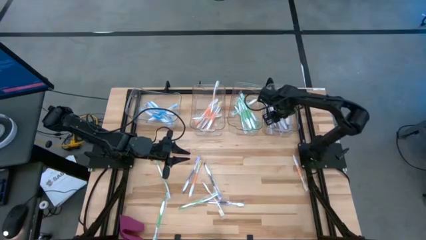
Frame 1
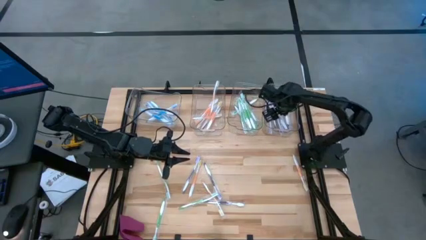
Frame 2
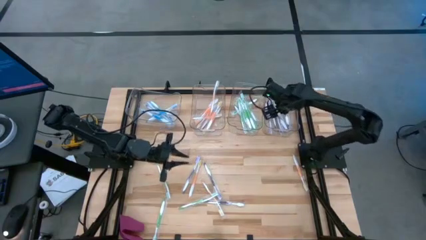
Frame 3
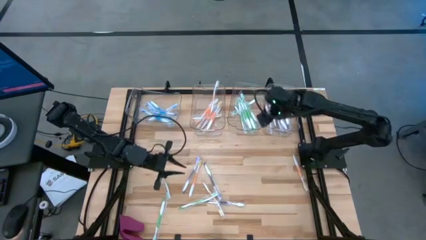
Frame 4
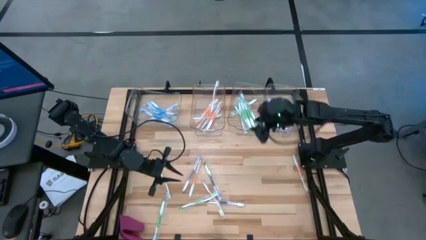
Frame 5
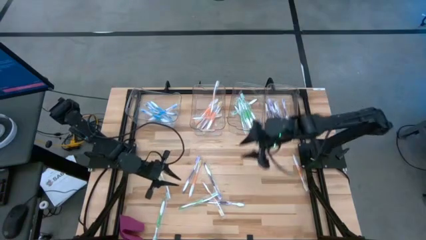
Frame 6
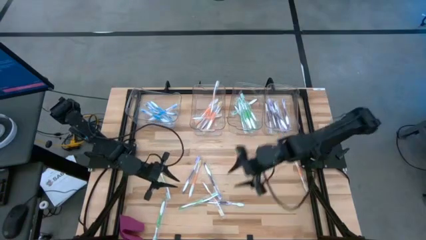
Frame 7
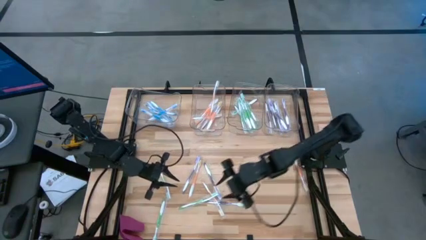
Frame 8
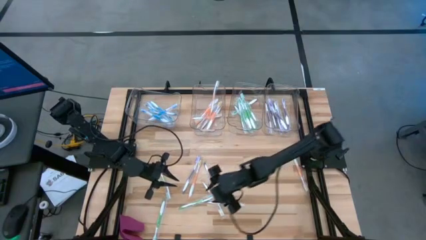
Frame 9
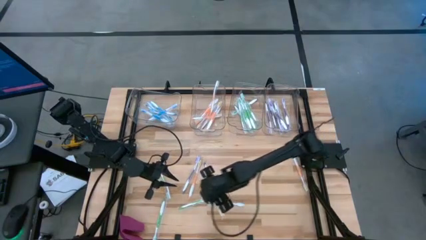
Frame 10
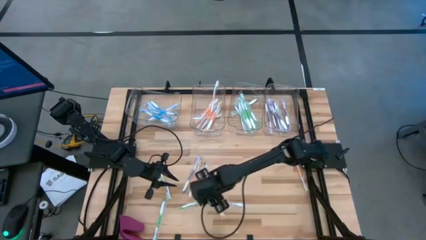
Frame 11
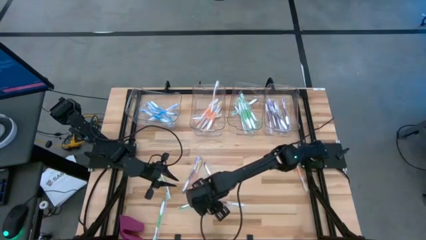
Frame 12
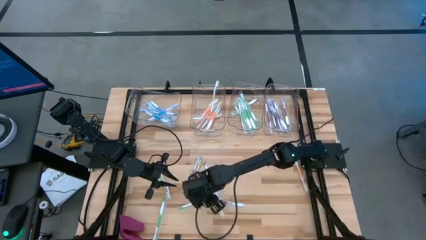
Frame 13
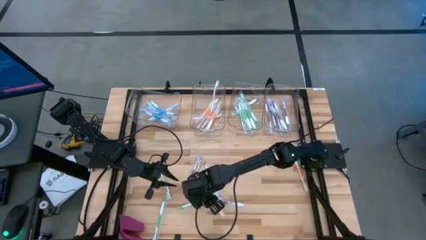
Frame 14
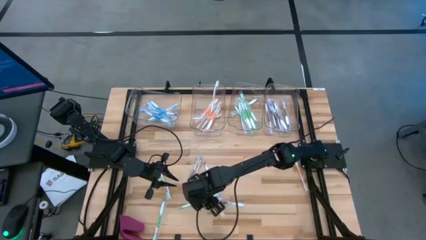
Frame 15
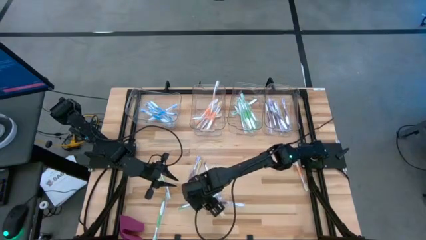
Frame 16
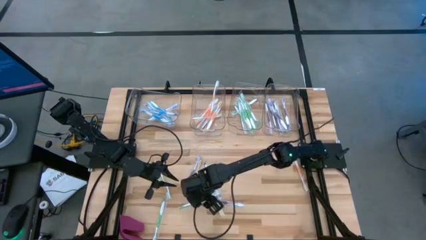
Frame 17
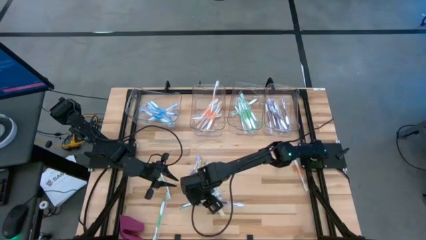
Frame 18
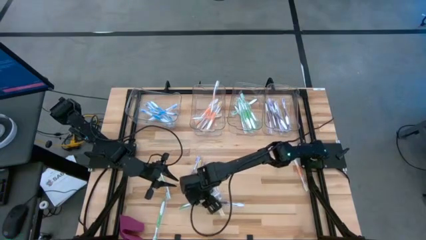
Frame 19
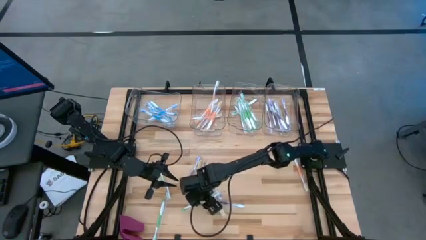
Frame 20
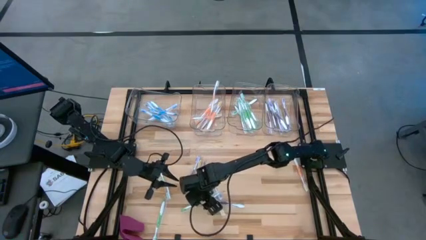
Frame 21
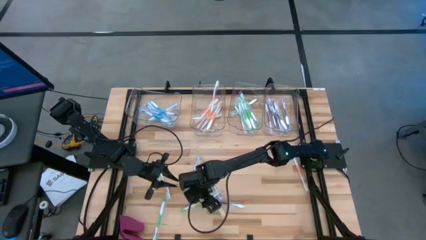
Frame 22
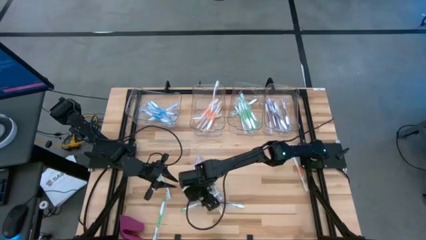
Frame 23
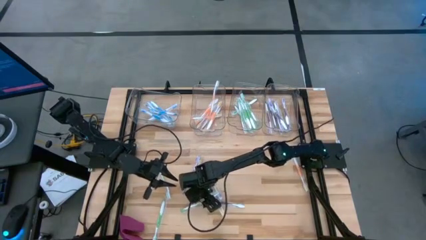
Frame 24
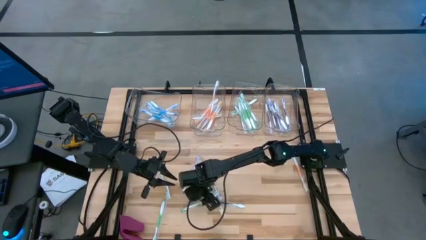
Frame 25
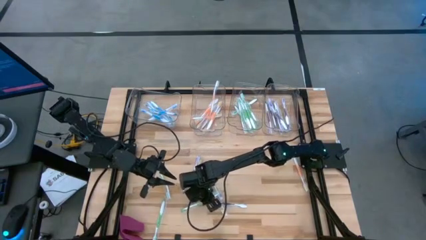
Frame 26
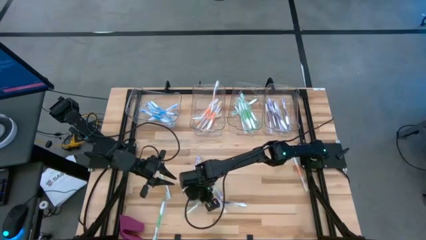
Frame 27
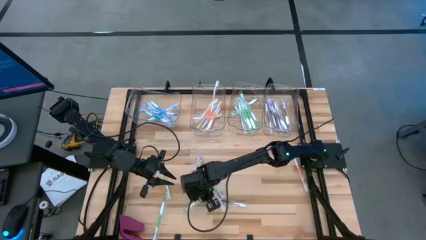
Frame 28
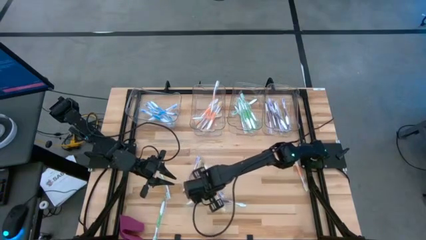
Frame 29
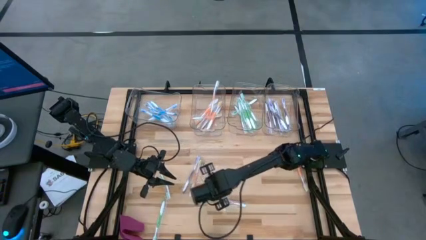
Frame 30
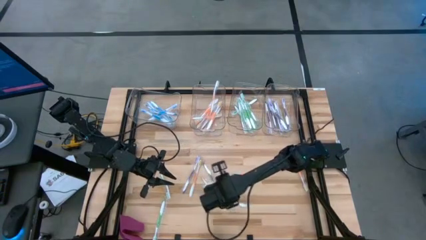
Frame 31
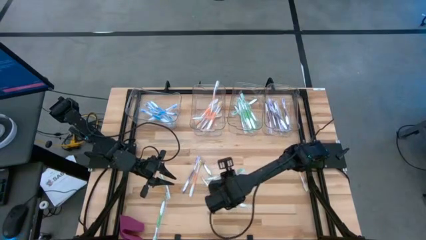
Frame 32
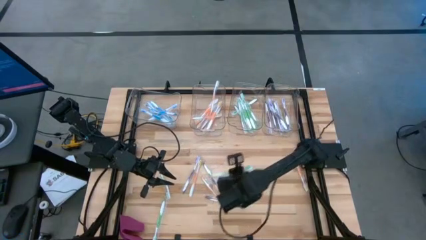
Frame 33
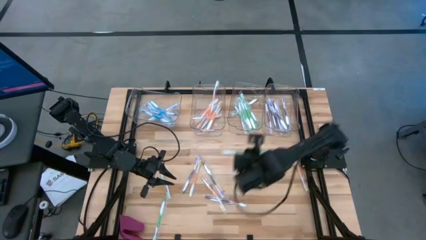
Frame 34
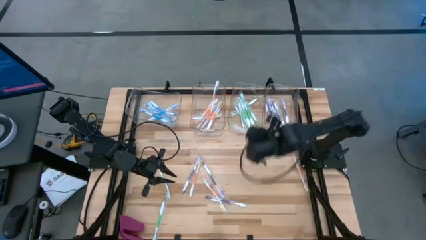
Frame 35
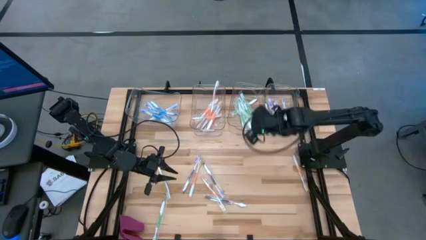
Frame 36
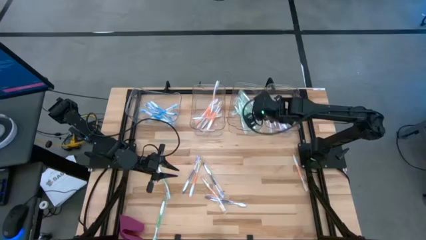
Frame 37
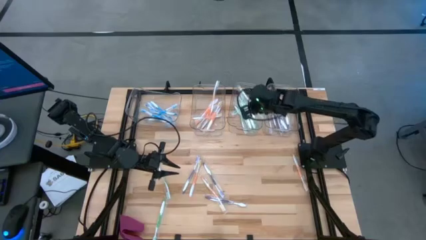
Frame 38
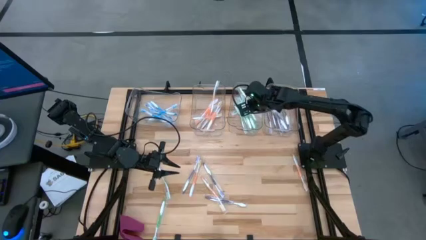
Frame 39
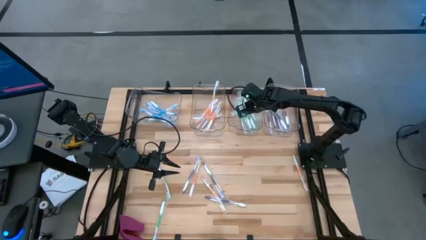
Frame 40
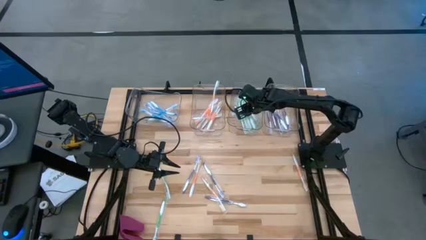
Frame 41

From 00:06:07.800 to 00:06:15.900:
Task: Pick & Place Toothbrushes
Put the green toothbrush into the middle right transparent bin

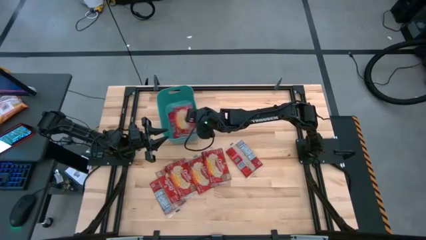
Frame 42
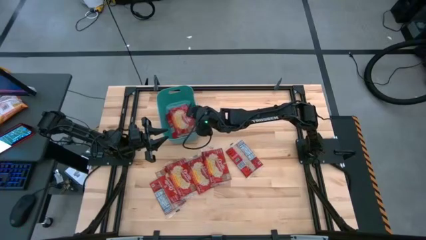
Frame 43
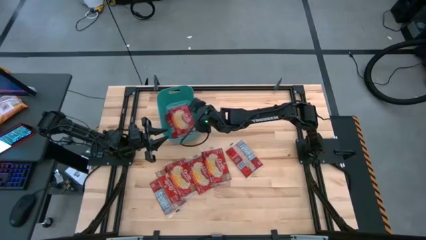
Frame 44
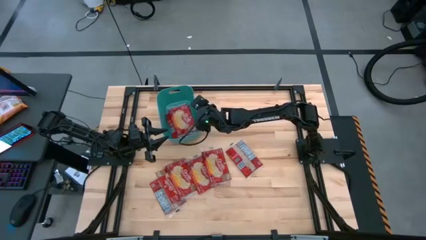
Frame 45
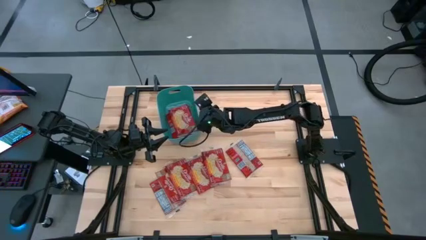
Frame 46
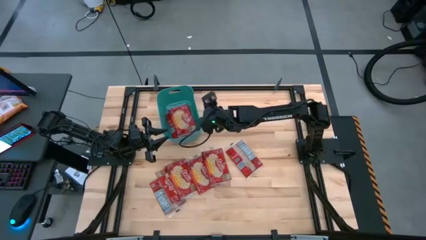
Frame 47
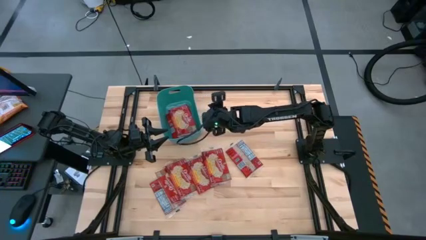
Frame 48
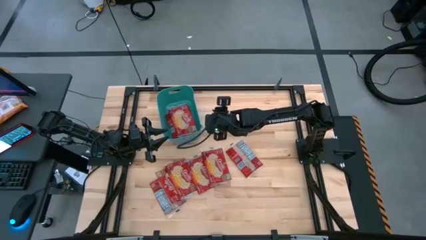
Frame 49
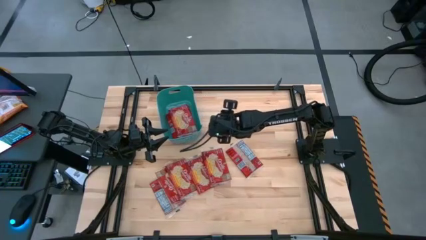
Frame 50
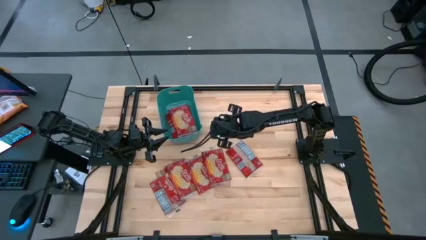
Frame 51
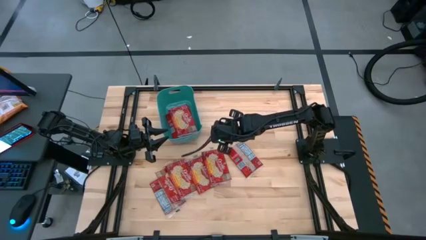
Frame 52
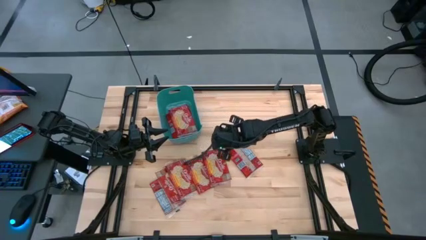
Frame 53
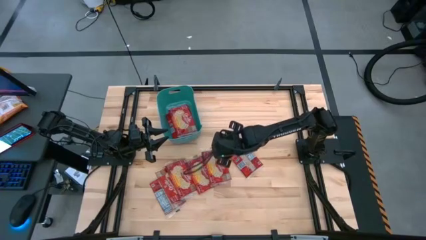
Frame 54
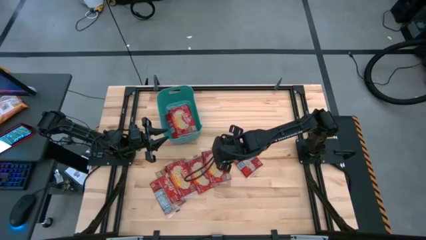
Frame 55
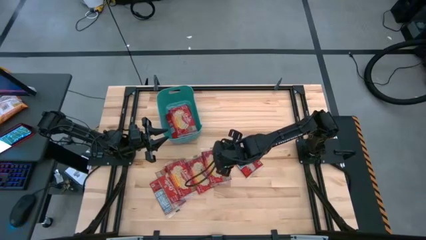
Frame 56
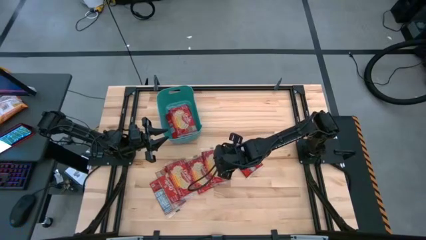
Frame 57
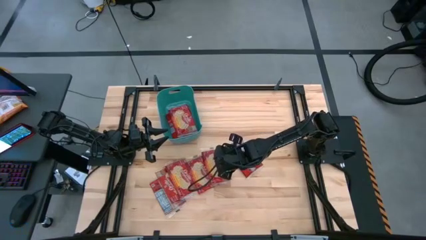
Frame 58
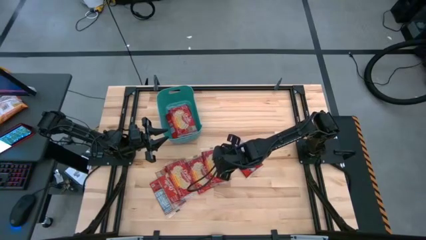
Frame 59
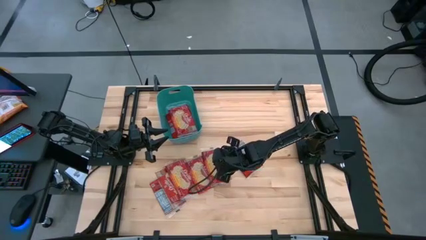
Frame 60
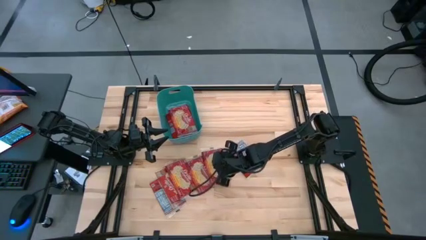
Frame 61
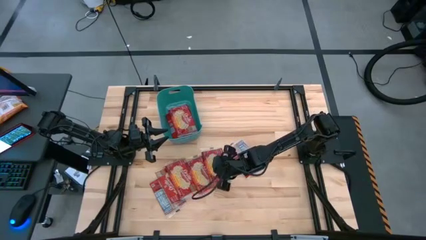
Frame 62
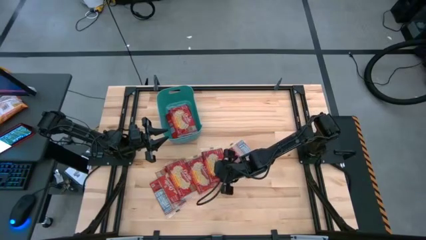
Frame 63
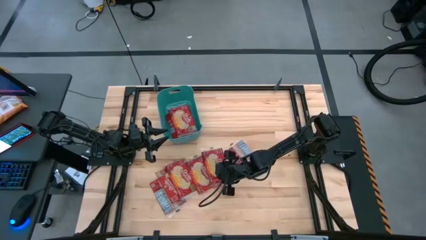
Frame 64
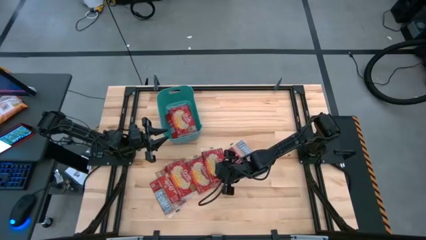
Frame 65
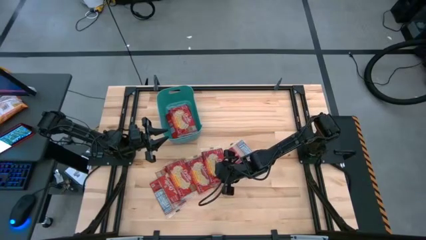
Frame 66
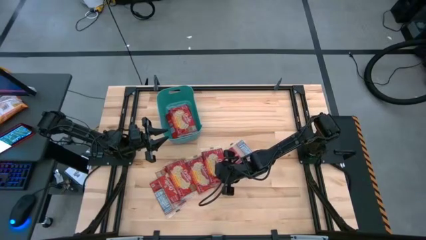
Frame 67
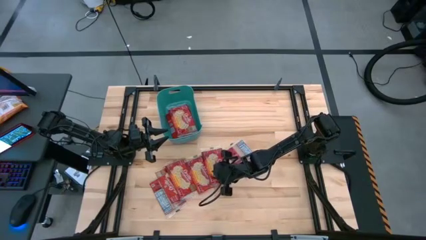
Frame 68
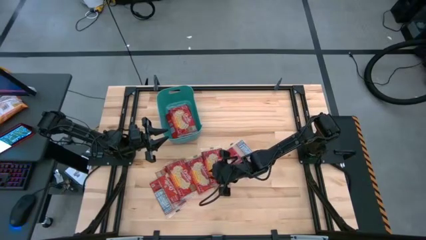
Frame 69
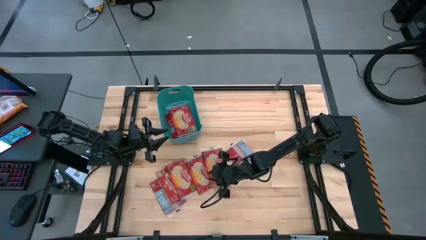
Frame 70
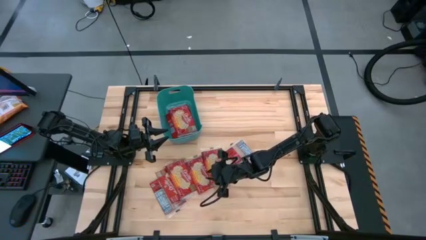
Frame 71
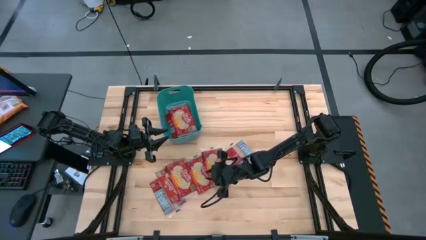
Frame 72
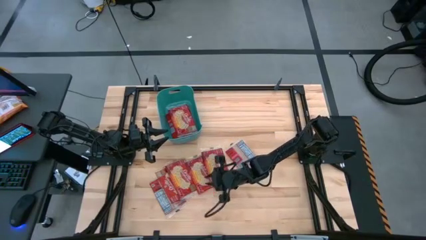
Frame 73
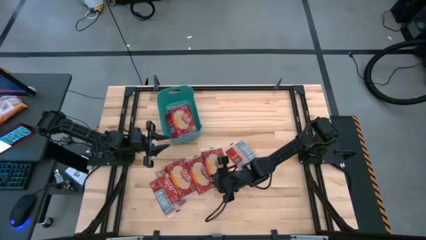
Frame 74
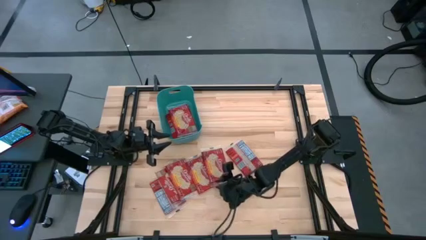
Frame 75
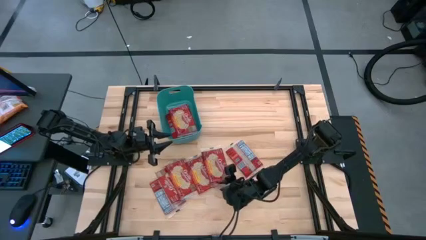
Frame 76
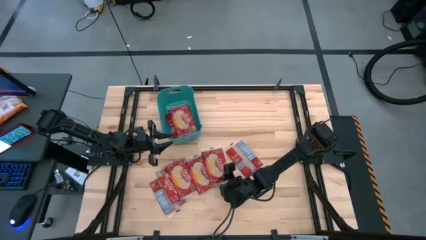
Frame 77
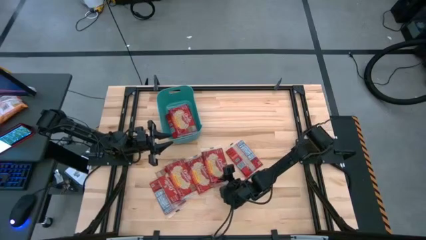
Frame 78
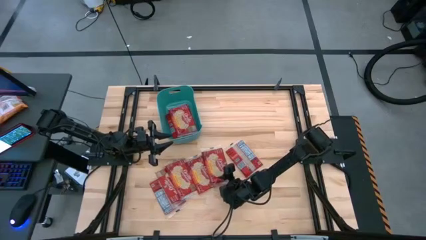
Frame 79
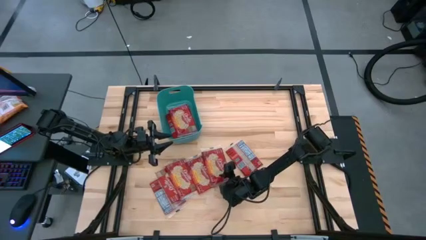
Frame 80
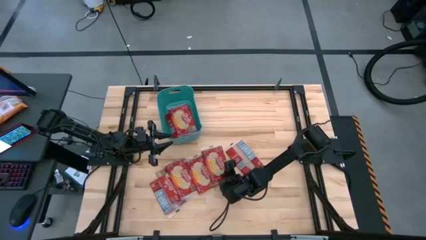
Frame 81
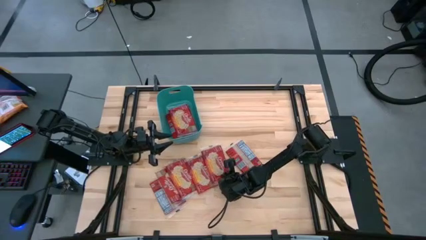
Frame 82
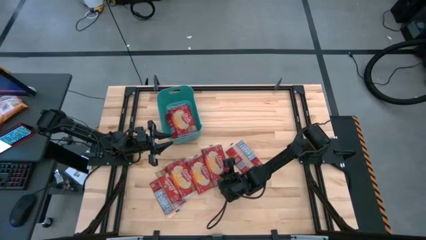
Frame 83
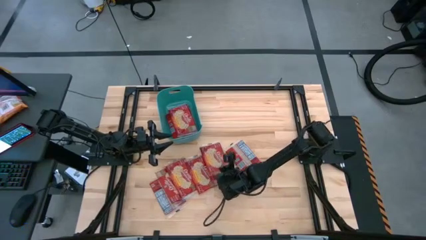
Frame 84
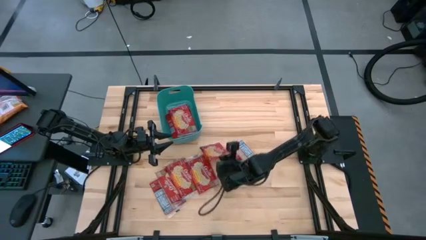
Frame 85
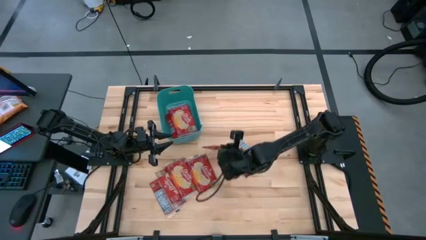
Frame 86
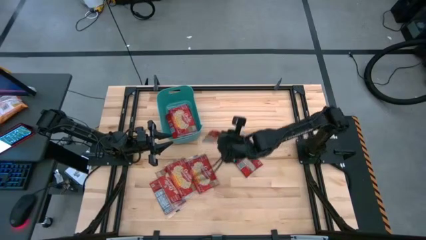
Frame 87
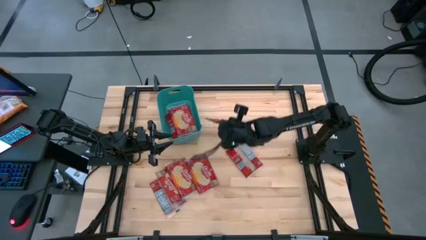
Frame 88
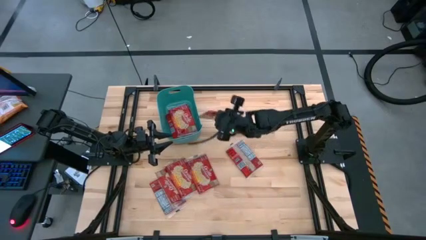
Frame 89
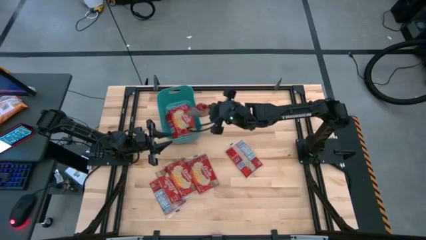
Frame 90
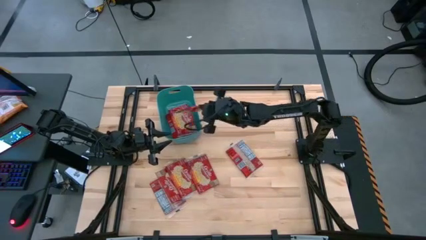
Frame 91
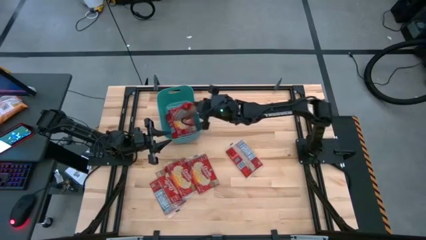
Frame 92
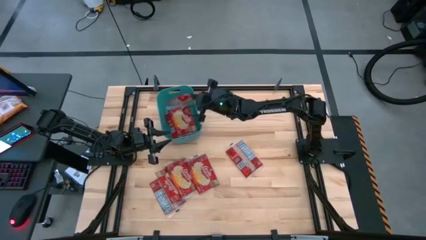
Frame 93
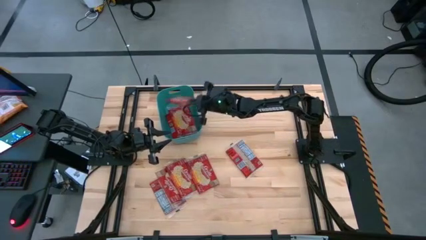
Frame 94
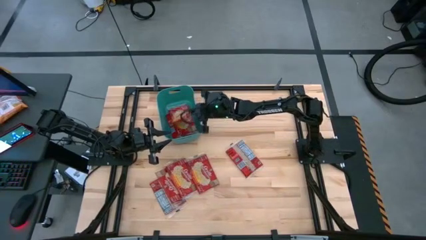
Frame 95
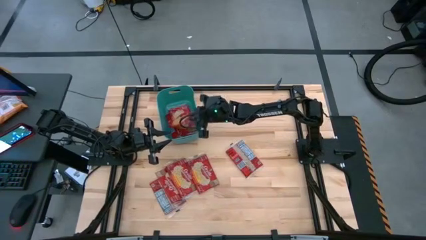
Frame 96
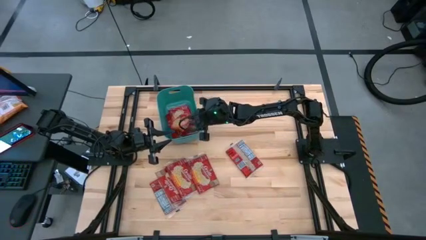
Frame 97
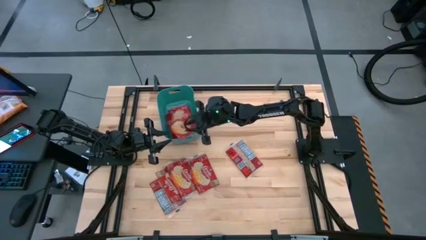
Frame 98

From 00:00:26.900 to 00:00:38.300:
Task: Sort popcorn bags into baskets
Put the red popcorn bag into the green bin
